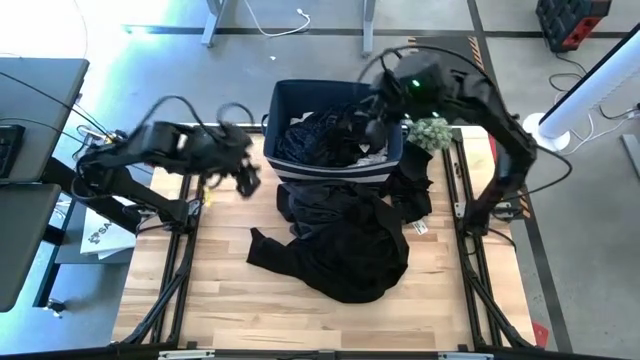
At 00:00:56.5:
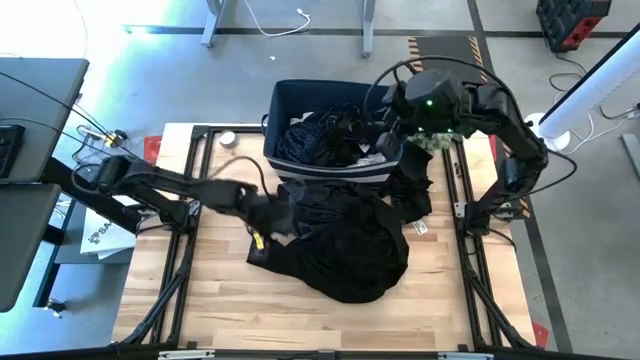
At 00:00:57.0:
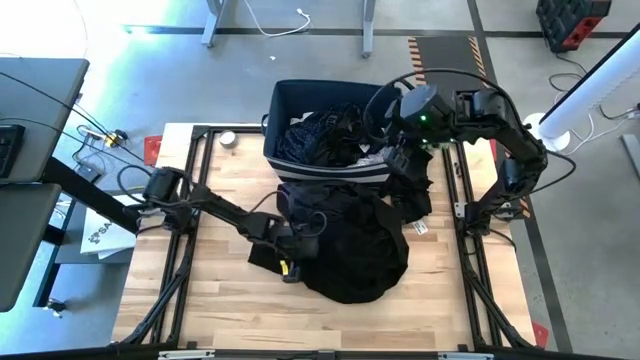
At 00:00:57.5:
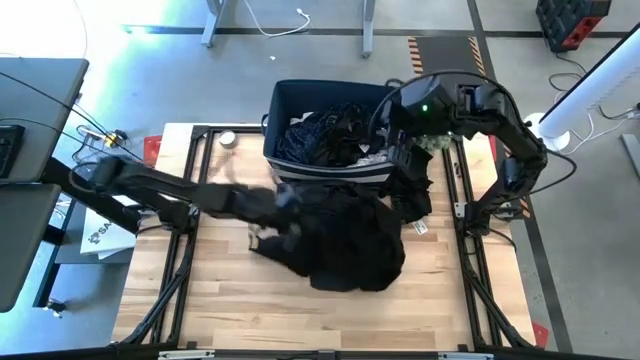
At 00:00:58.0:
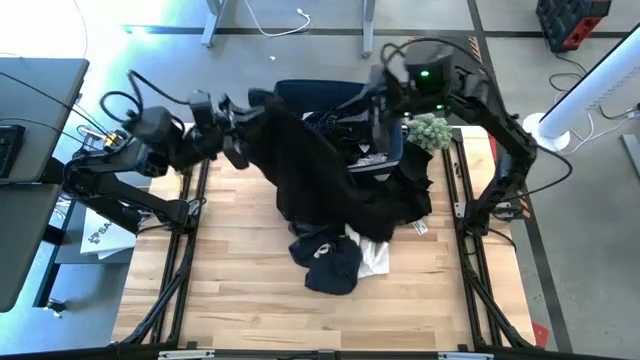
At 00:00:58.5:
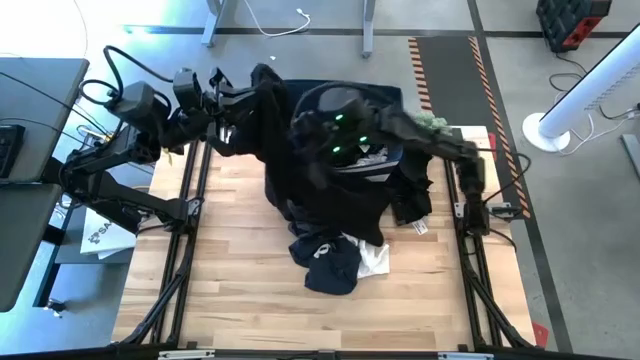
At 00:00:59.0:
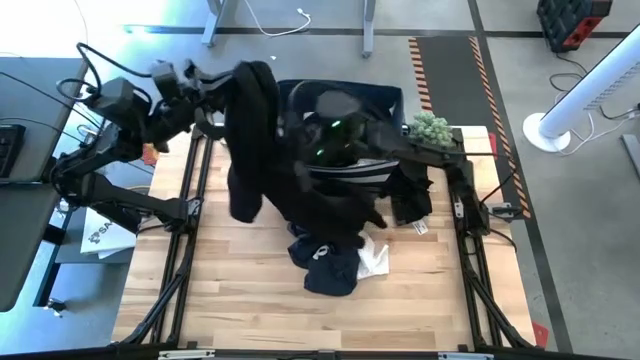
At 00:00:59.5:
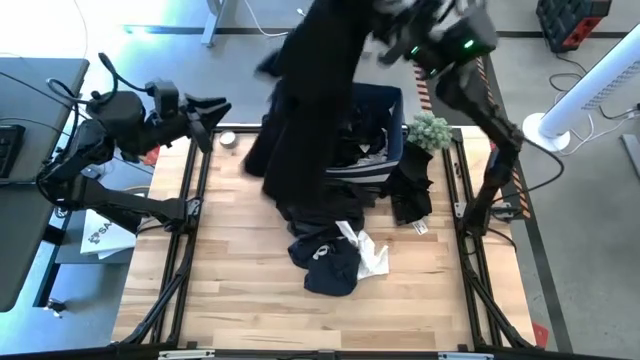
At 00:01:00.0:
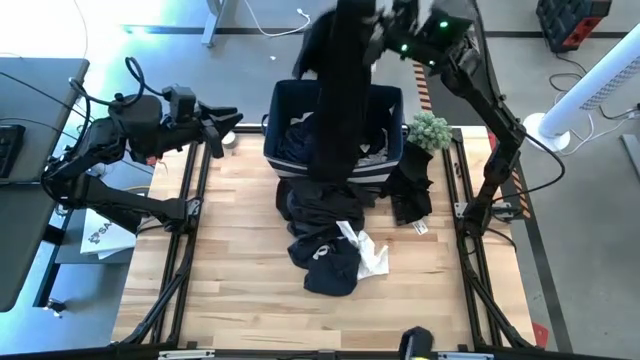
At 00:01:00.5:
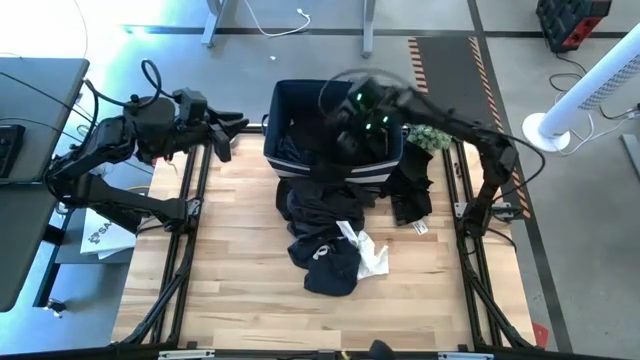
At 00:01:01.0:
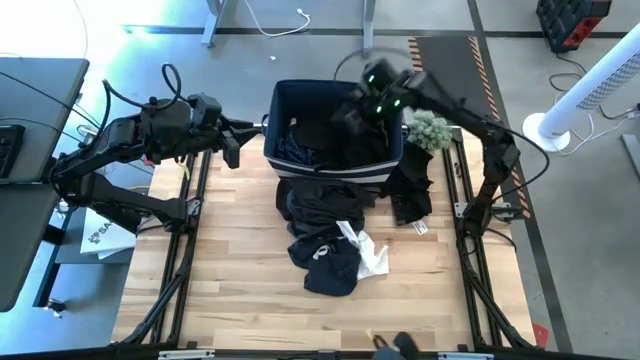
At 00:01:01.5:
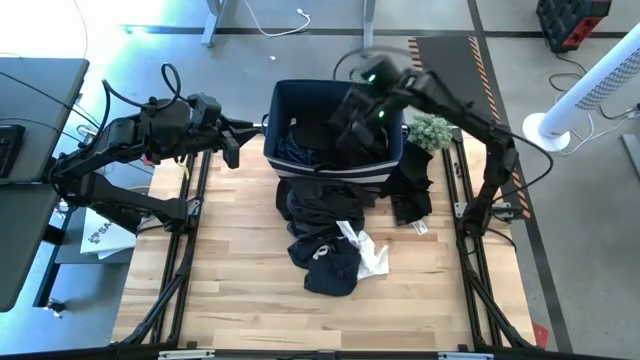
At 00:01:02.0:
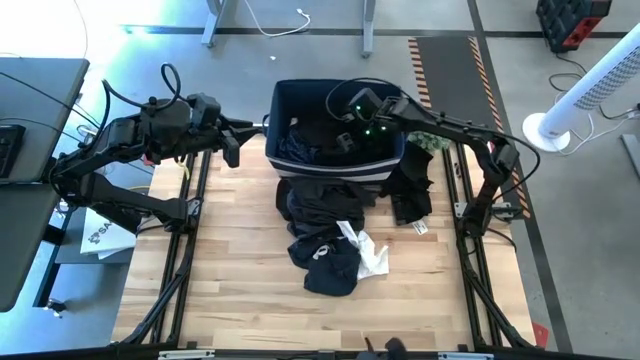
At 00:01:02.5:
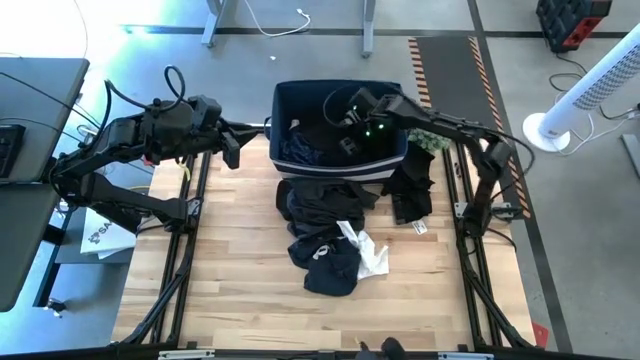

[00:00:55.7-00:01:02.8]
Task: Sort clothes
Put the black sweater into the blue bin

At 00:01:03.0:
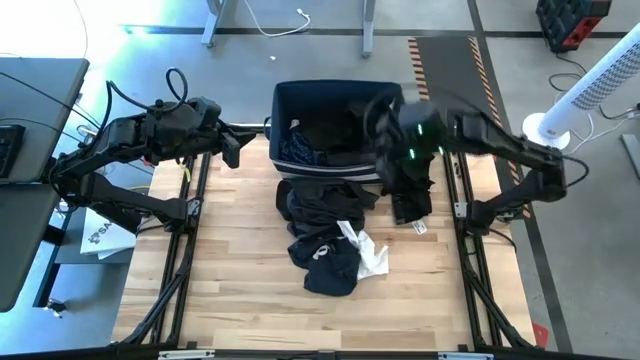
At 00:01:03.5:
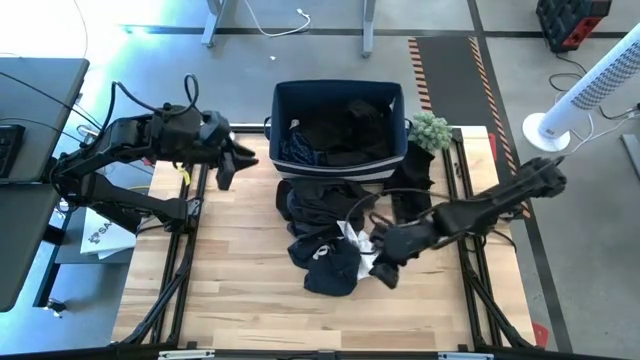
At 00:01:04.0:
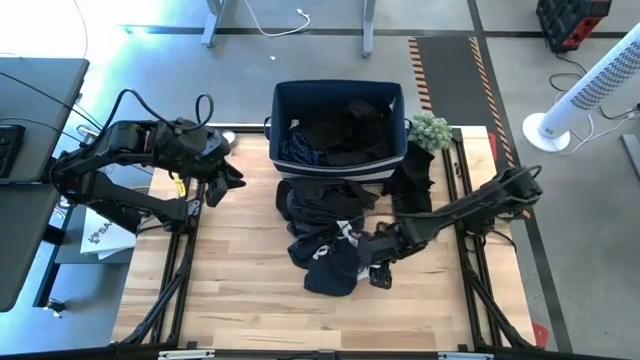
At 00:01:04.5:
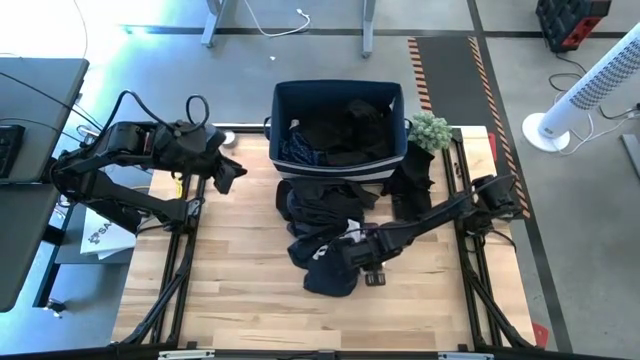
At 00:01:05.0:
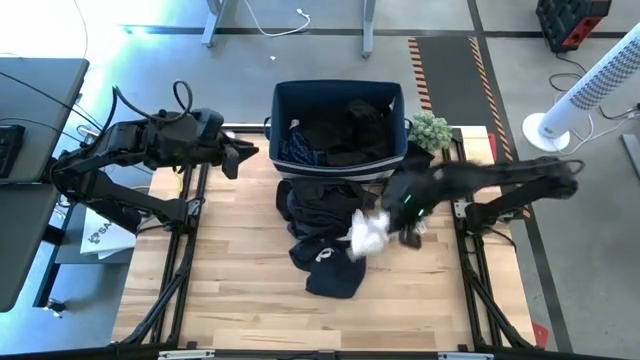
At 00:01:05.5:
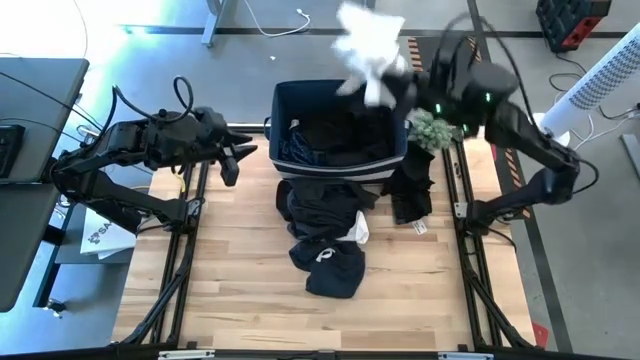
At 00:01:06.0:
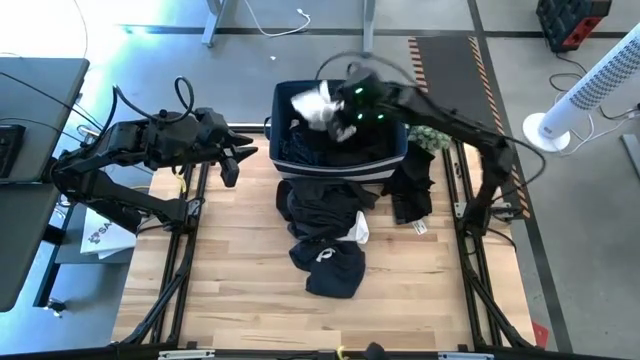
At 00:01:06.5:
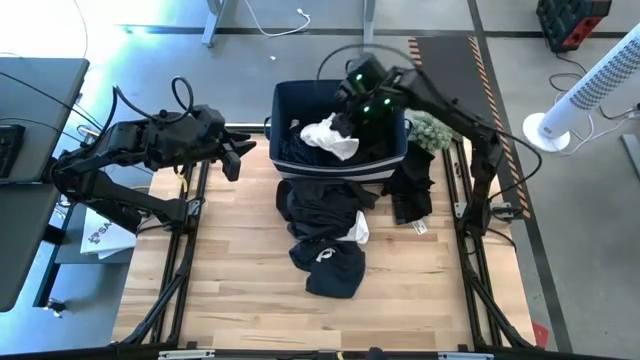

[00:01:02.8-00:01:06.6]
Put the white towel into the blue bin

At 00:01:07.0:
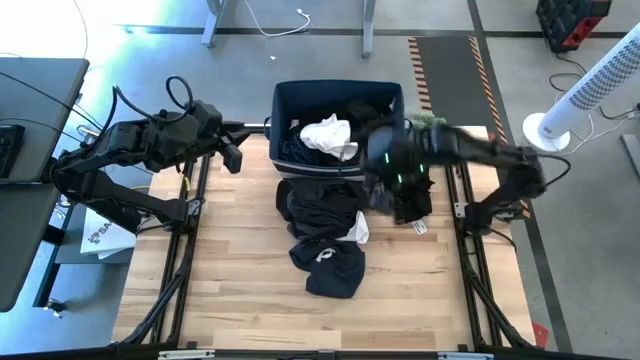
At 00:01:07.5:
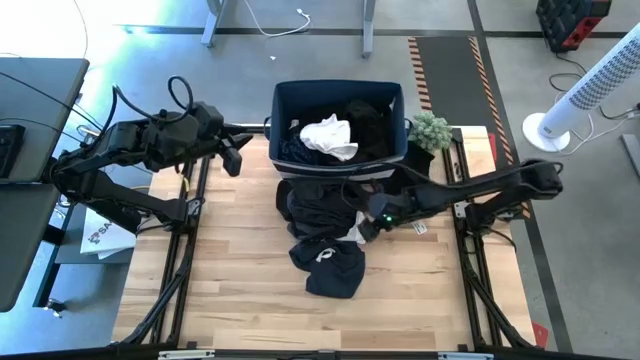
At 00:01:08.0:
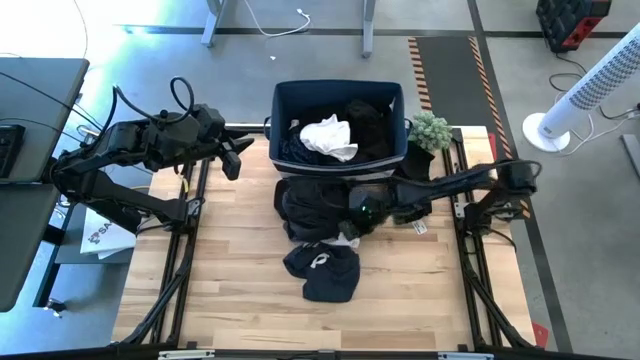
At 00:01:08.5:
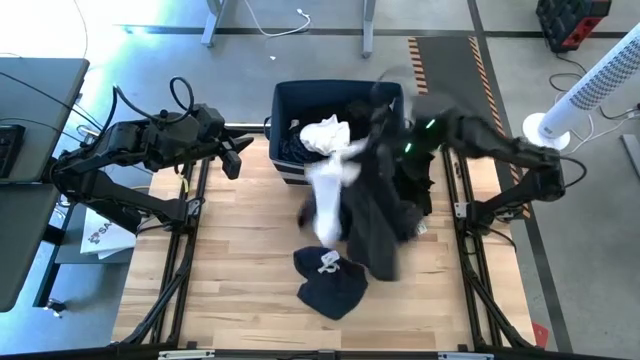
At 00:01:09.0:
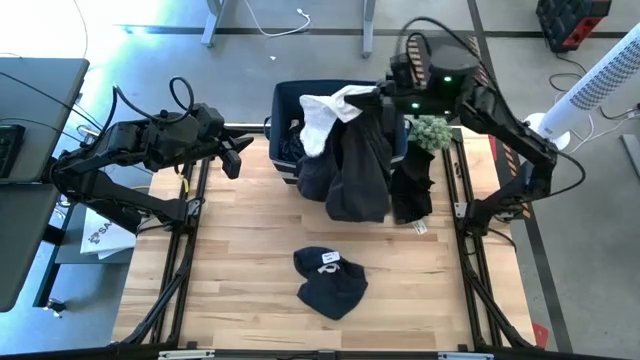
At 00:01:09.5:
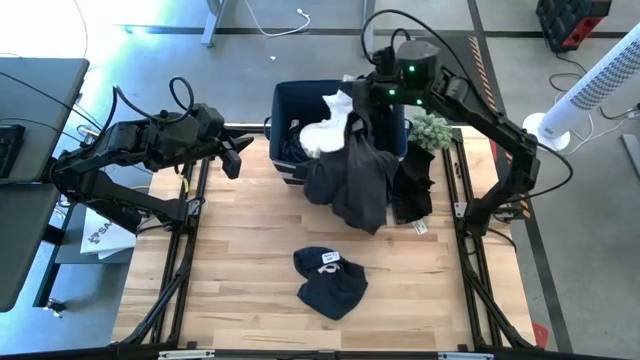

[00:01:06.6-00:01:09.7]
Put the black shorts including the white sock into the blue bin

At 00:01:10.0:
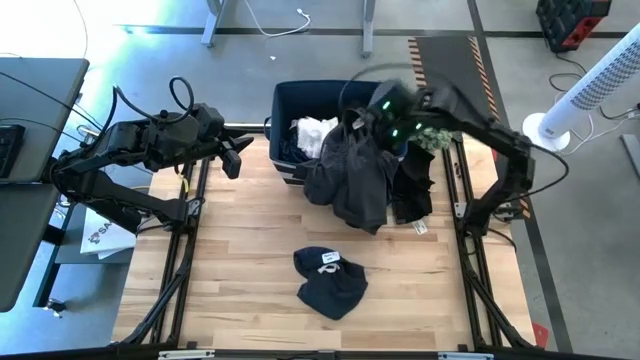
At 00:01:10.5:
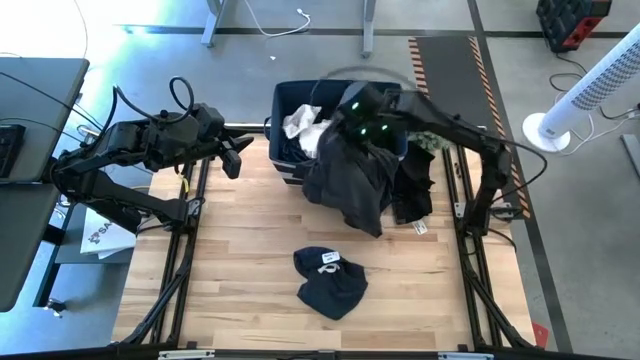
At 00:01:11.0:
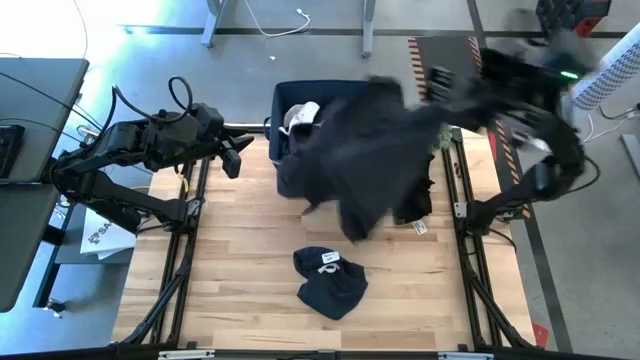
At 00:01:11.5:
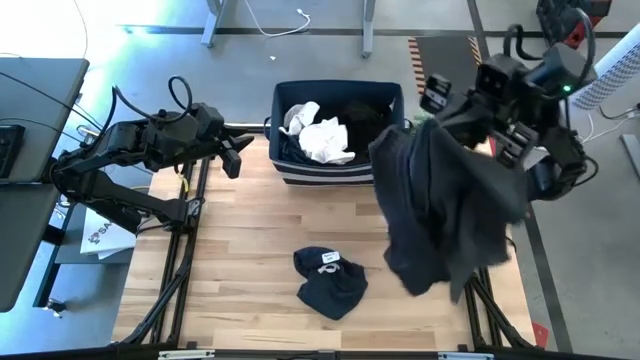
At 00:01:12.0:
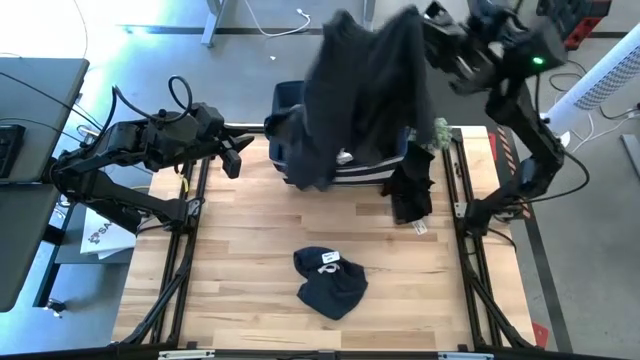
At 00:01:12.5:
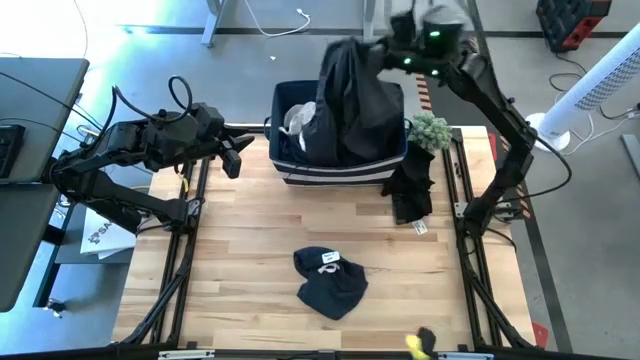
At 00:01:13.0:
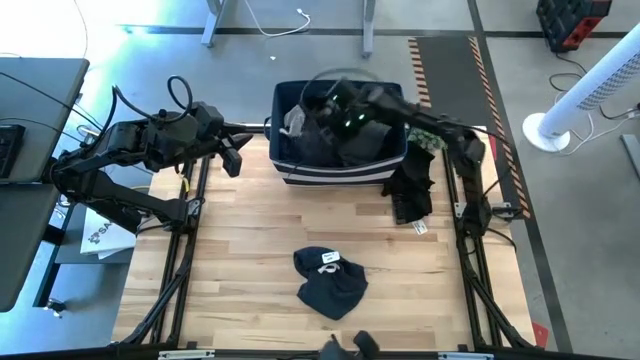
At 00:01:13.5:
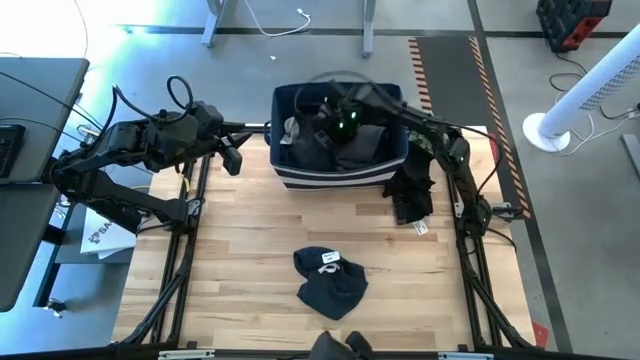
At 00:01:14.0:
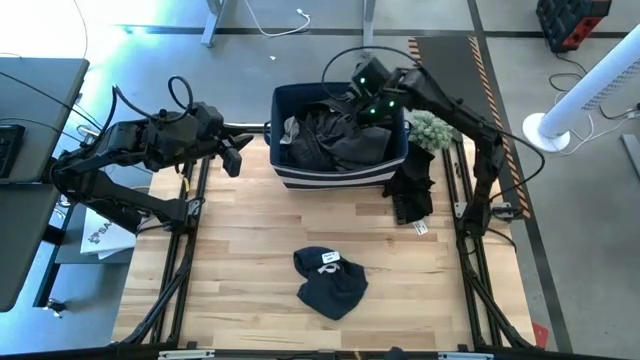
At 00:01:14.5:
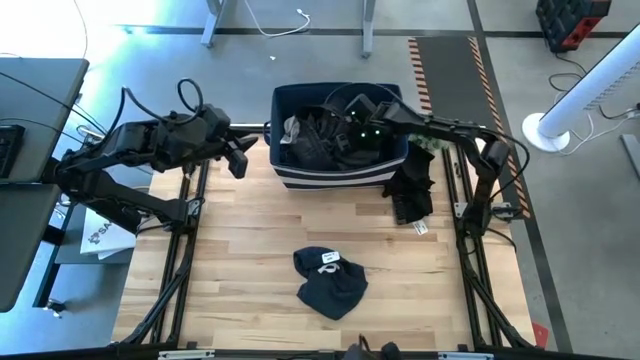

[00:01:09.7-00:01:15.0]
Put the black shorts into the blue bin

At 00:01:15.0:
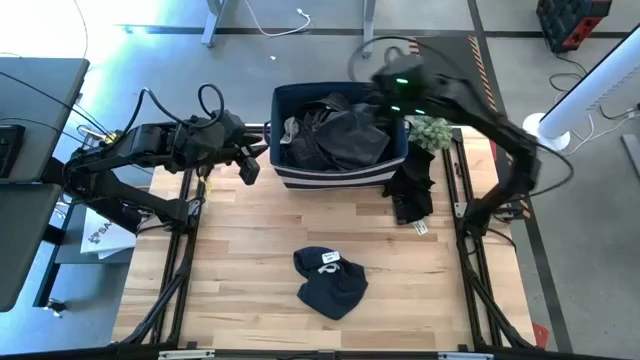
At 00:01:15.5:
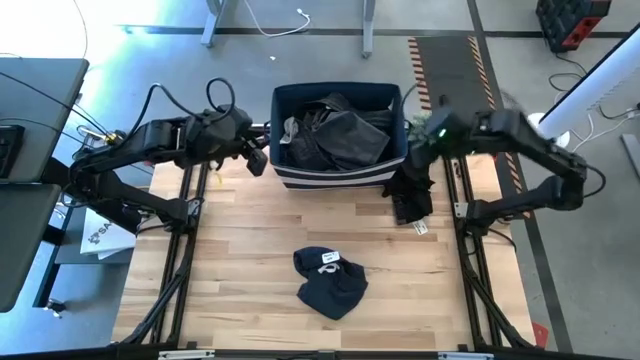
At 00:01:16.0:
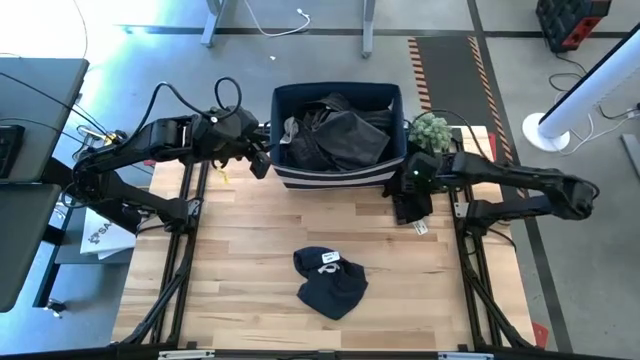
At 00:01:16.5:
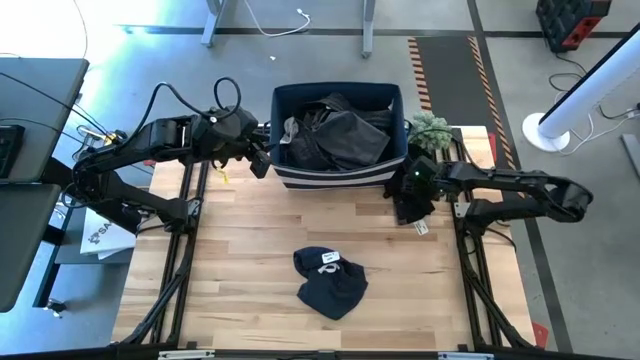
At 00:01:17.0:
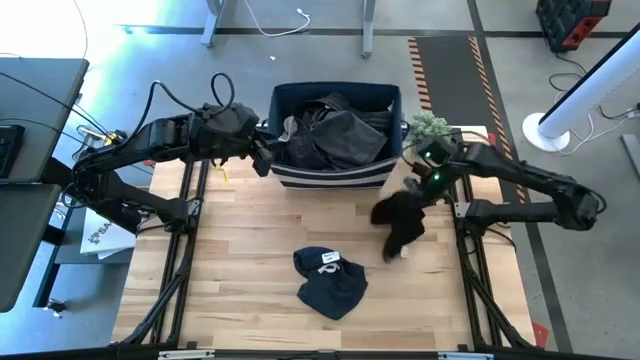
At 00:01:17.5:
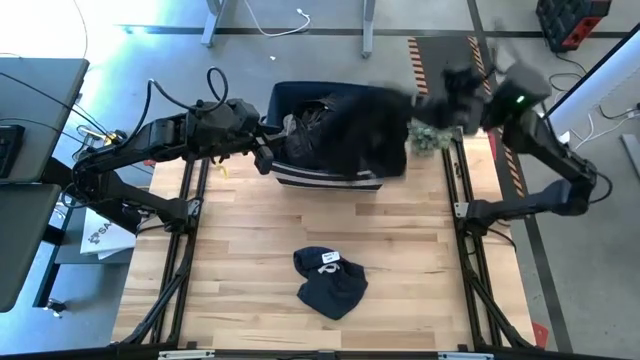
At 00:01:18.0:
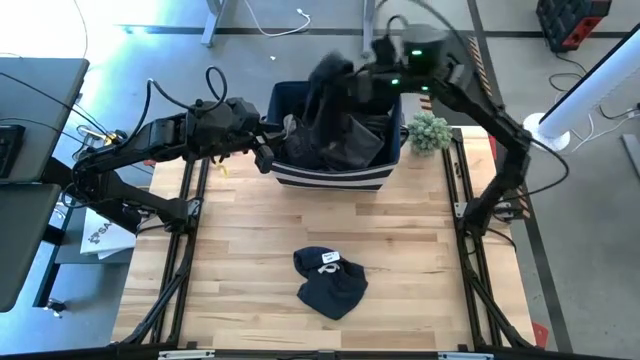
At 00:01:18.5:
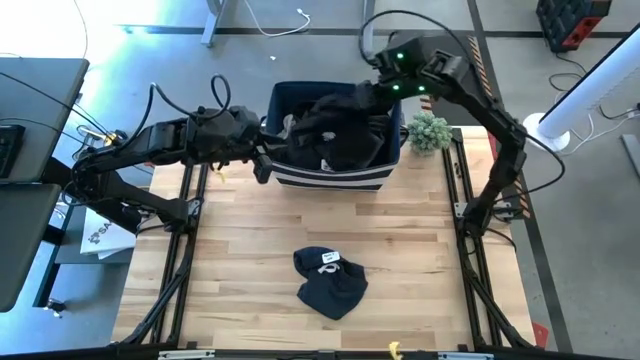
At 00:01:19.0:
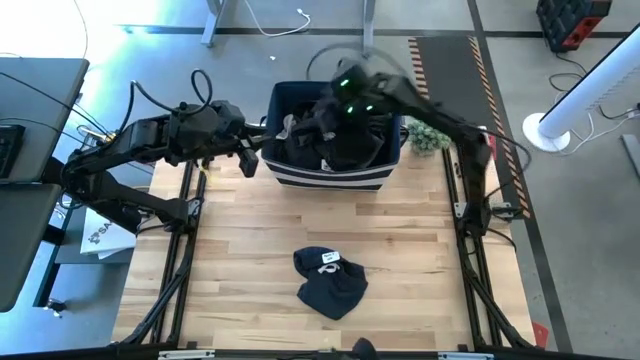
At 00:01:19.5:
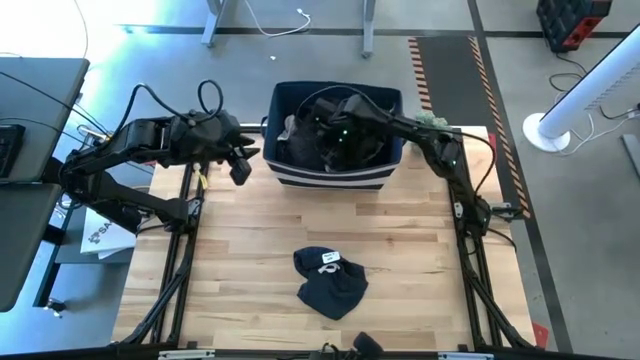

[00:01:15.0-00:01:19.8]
Put the black boxer into the blue bin
